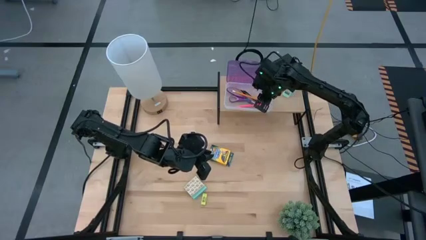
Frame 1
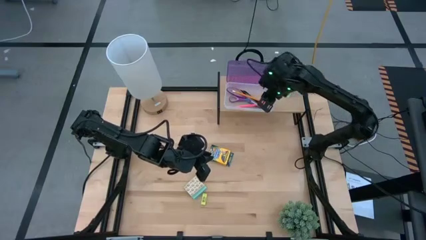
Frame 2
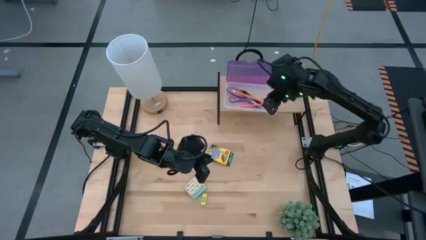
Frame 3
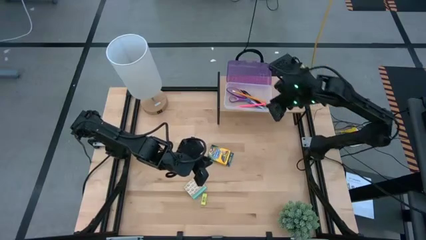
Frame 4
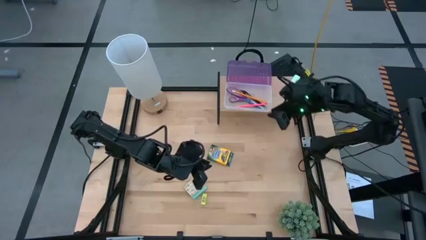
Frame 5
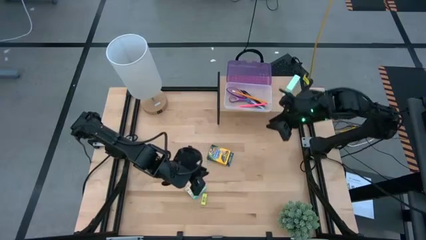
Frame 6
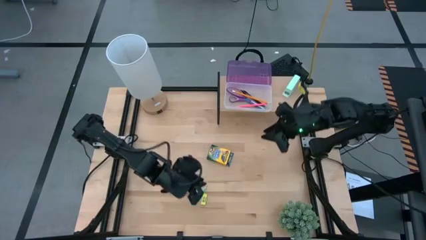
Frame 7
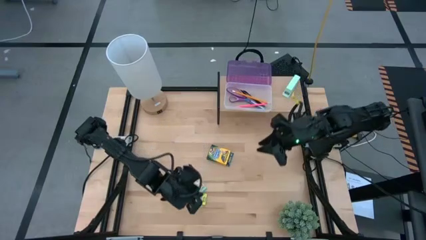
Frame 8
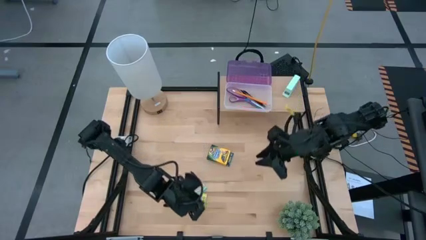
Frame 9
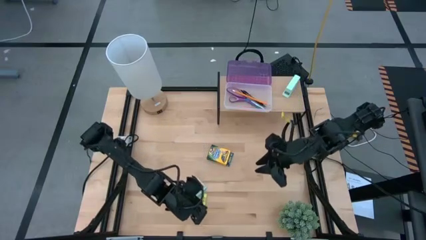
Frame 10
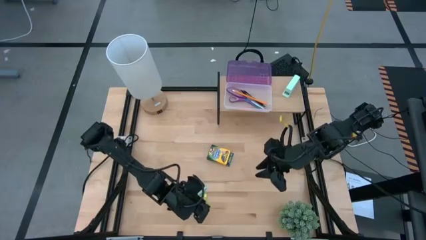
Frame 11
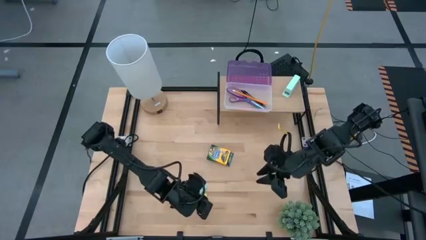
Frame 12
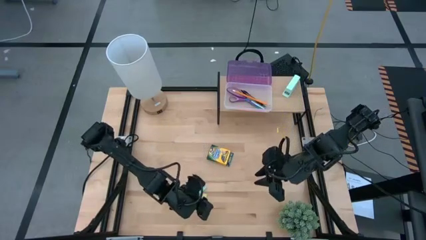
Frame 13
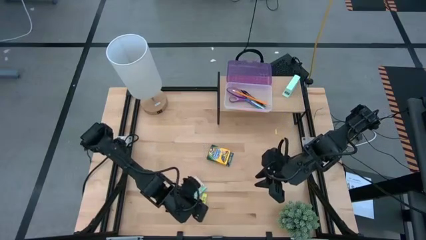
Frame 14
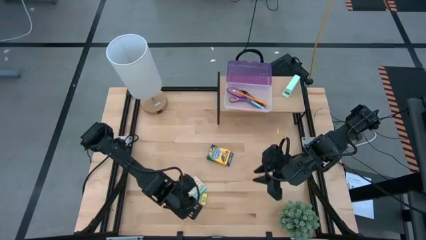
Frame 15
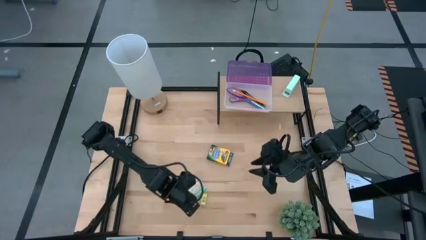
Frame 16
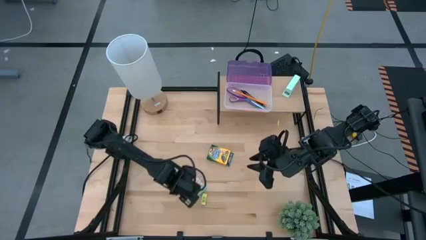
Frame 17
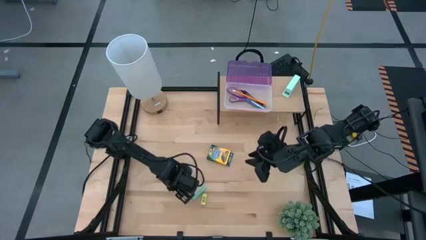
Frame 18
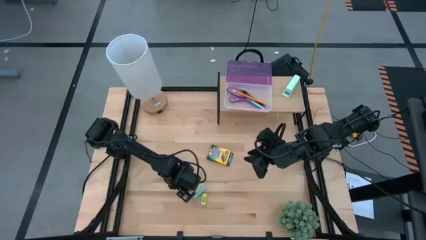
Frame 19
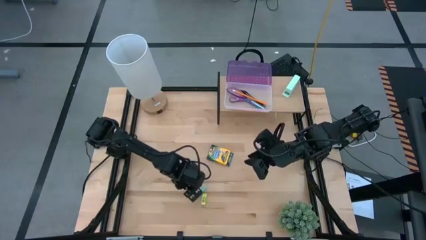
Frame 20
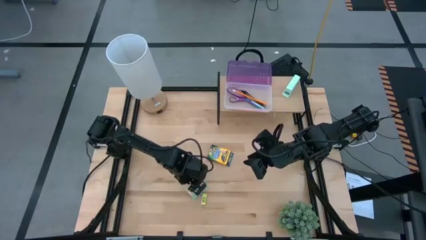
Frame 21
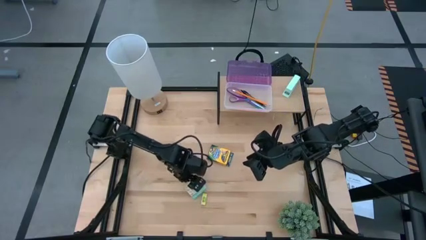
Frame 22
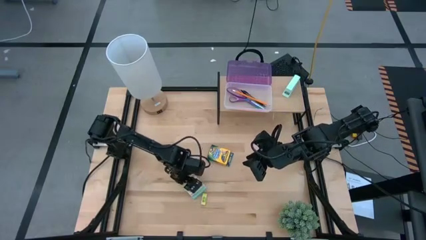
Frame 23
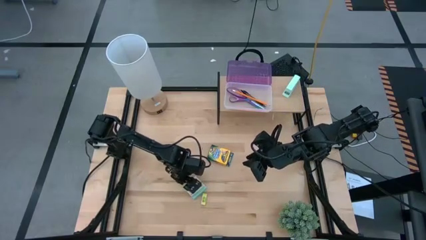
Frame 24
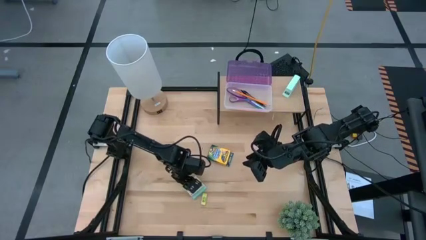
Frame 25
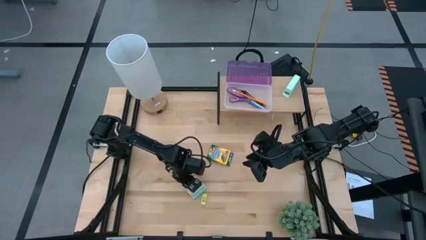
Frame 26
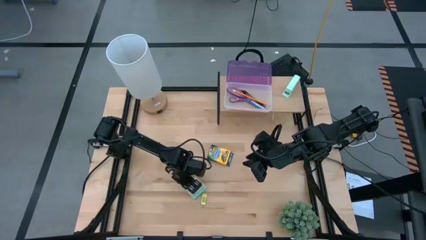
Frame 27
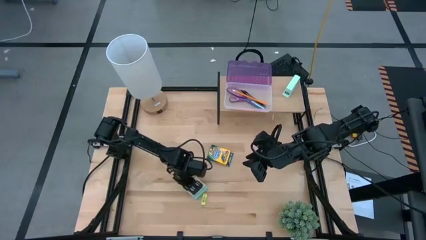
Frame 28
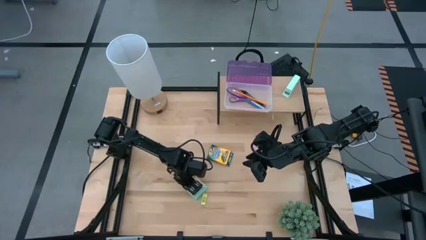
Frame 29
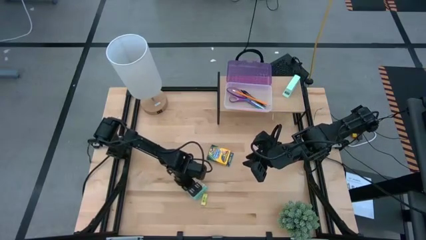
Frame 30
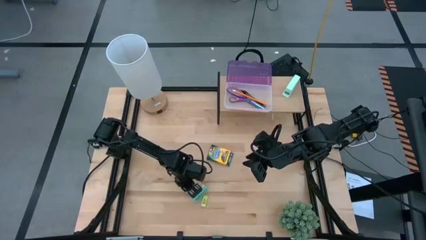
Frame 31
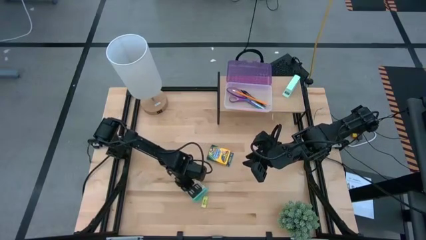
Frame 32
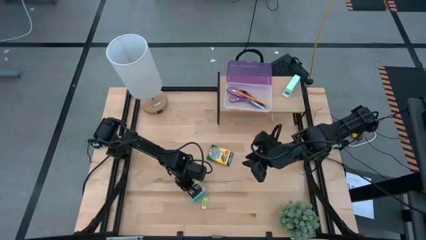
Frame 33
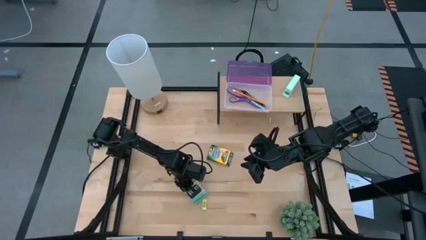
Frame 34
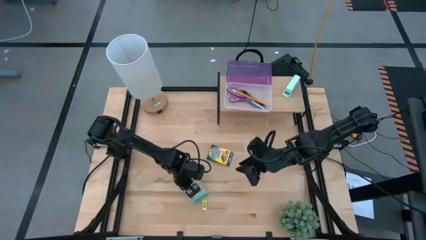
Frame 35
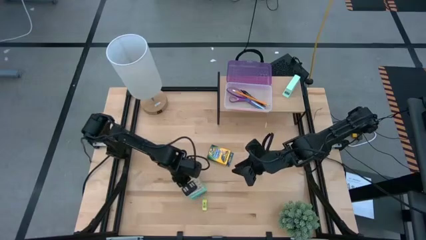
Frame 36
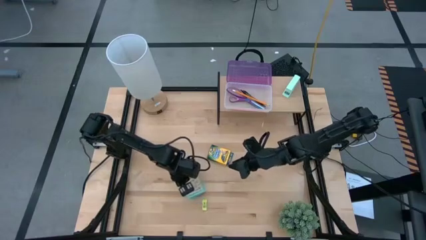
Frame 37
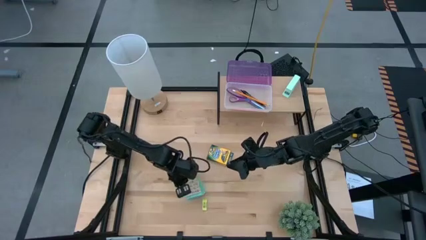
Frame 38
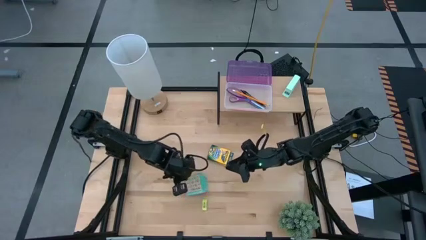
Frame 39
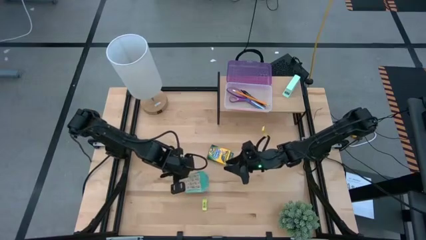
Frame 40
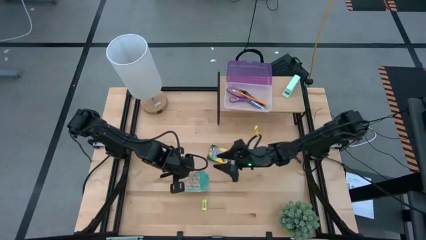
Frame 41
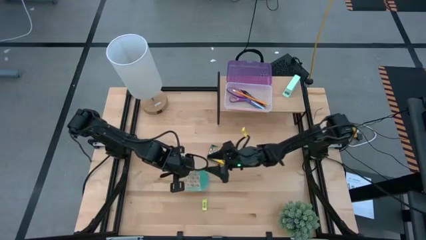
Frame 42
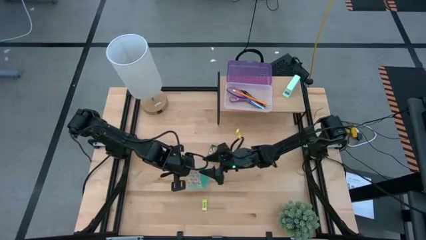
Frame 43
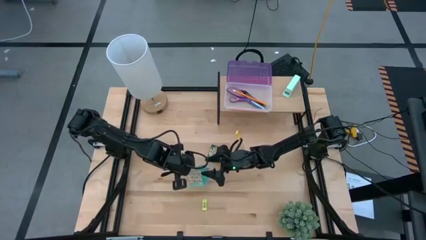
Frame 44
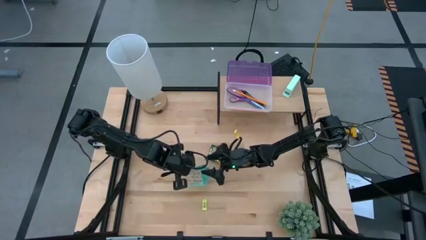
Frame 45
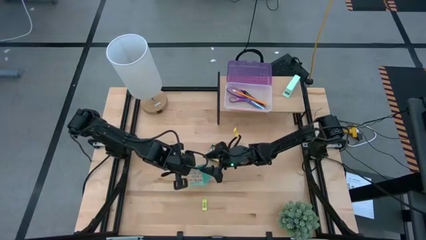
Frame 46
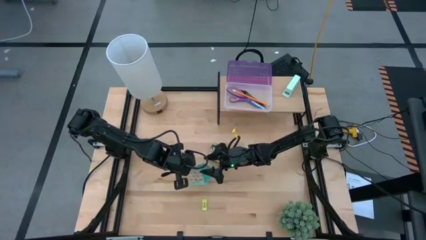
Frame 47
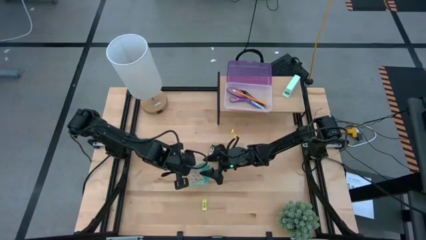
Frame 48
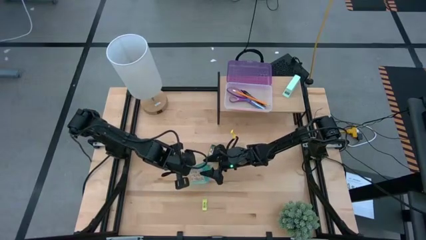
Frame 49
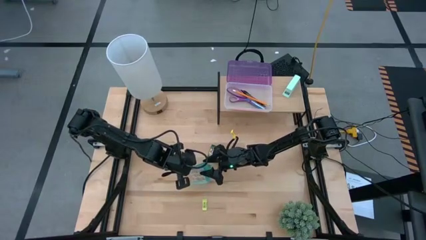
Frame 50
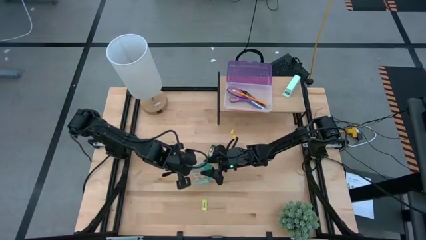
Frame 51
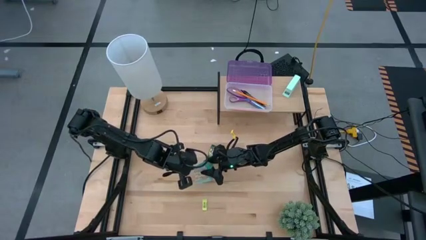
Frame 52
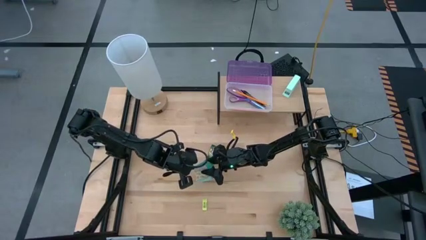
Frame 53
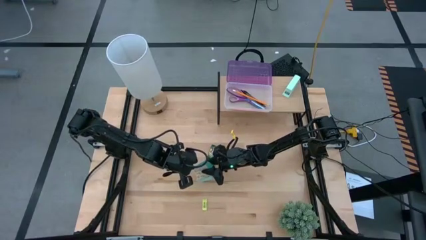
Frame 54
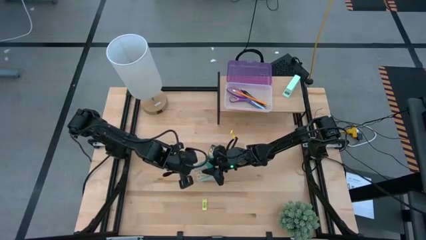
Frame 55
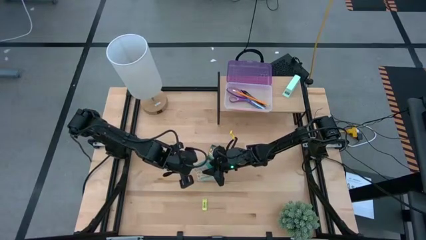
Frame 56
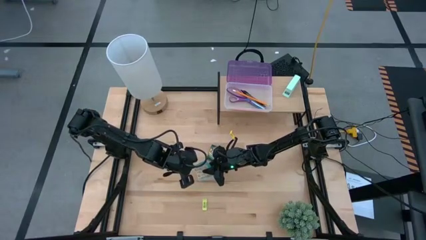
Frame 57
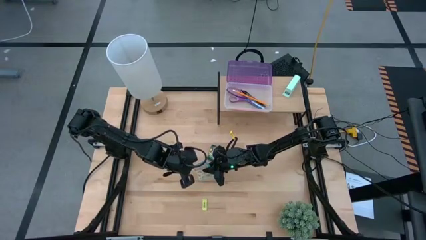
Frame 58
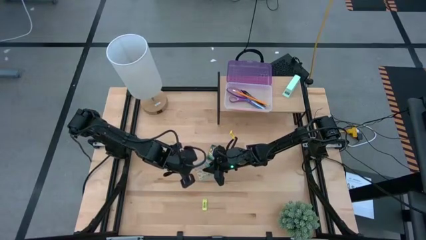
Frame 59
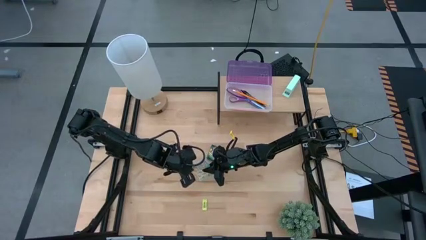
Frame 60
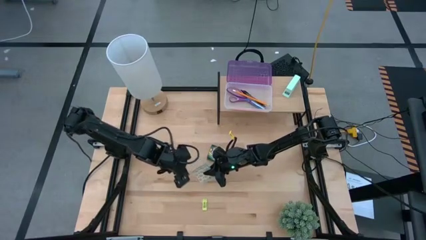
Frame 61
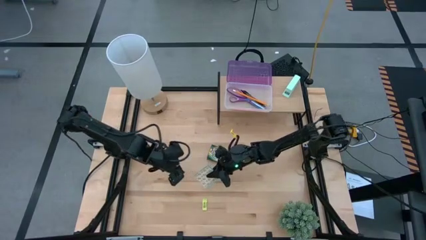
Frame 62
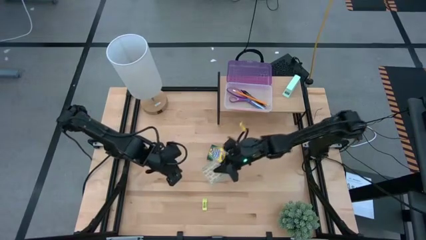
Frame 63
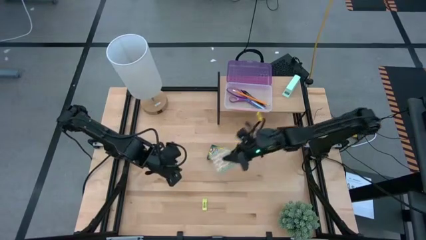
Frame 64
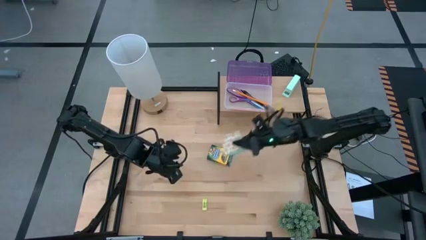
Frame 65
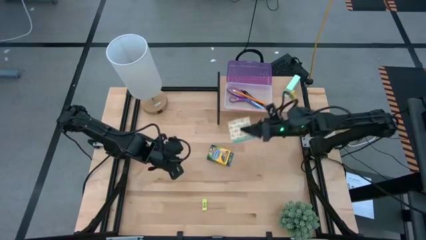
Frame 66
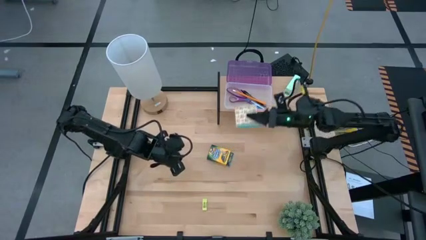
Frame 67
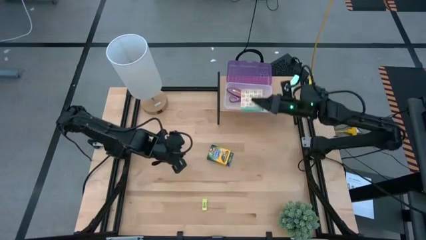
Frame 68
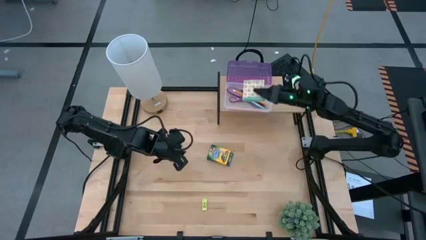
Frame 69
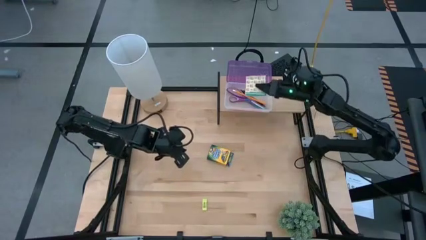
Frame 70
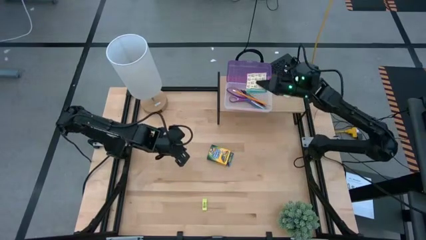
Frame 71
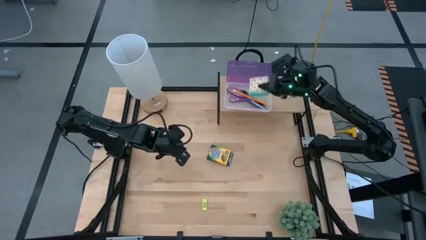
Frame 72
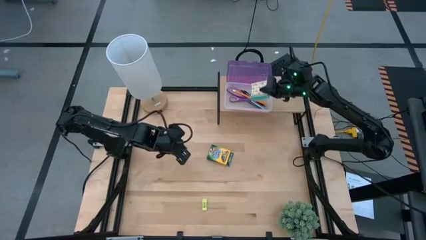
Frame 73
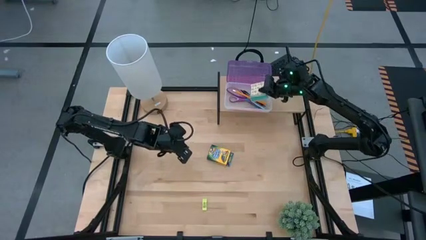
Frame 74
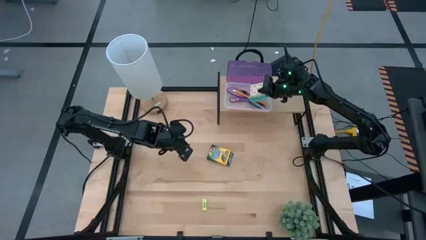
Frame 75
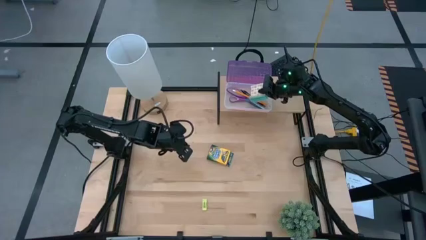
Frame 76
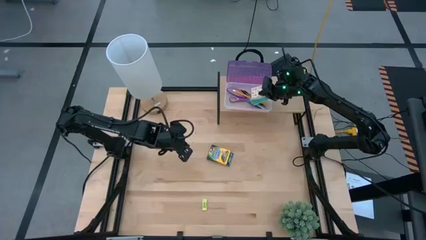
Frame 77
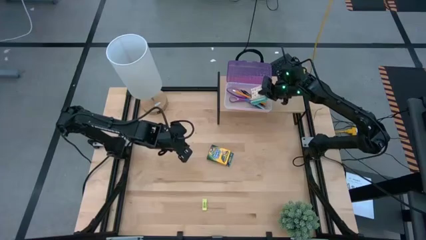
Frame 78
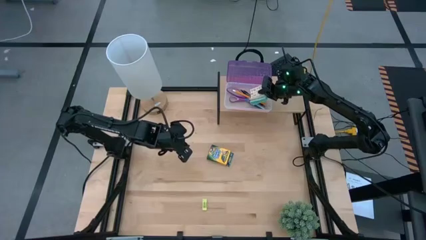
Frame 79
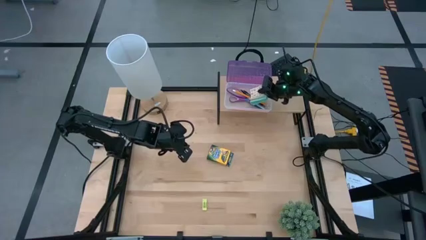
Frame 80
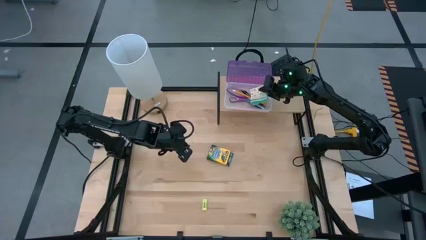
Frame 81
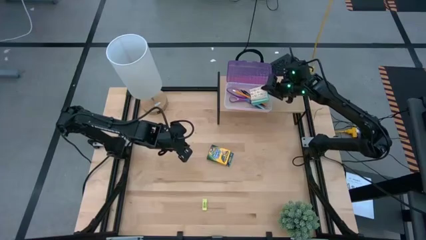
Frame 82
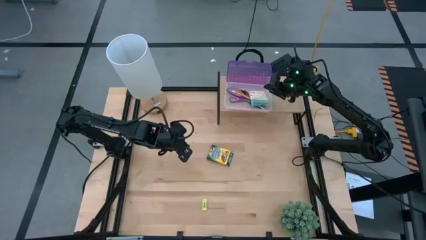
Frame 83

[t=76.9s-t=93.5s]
Task: Pick & place school supplies into a supply box
Put the blue sticky notes into the purple supply box on the shelf
